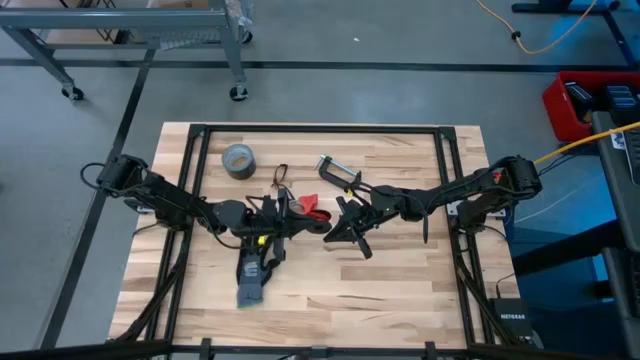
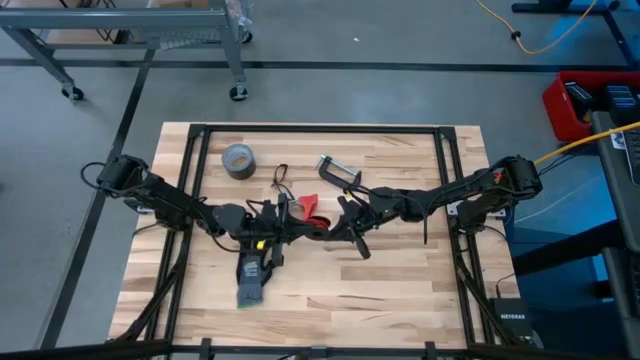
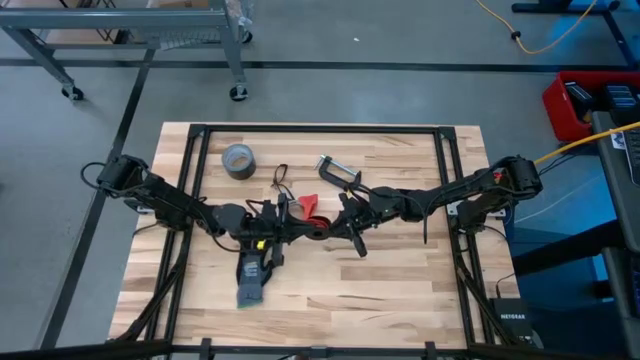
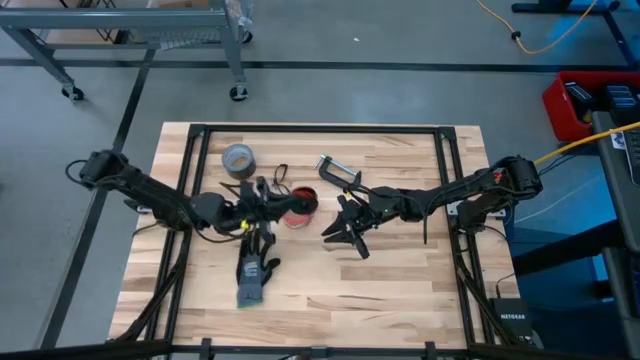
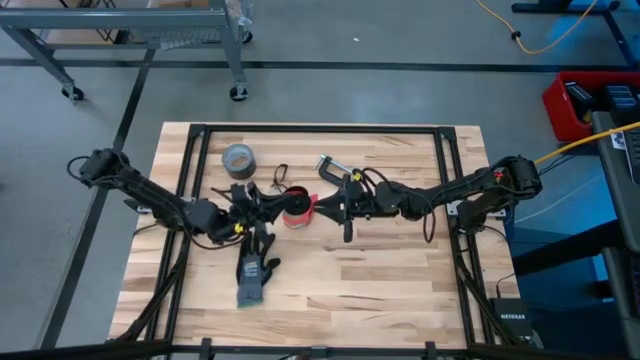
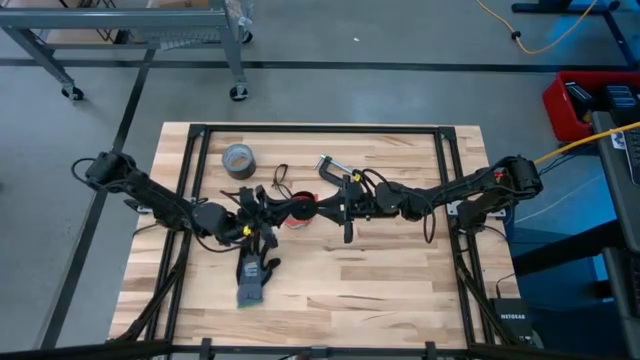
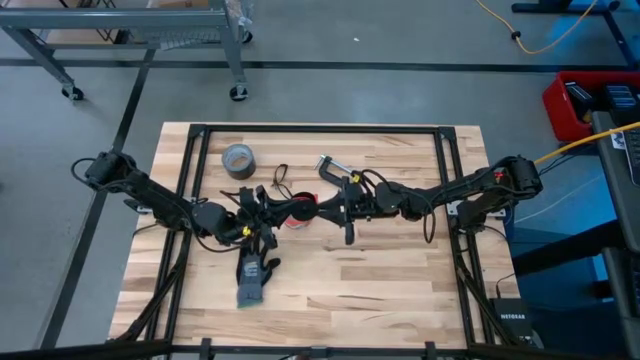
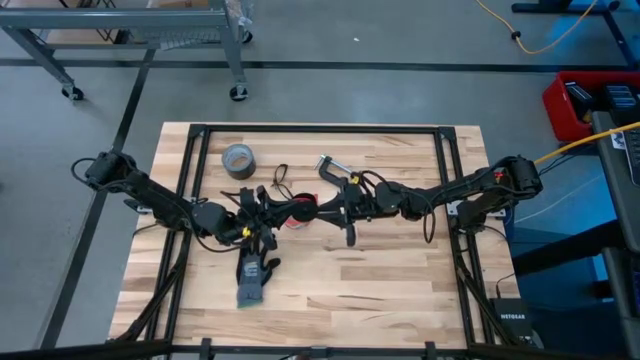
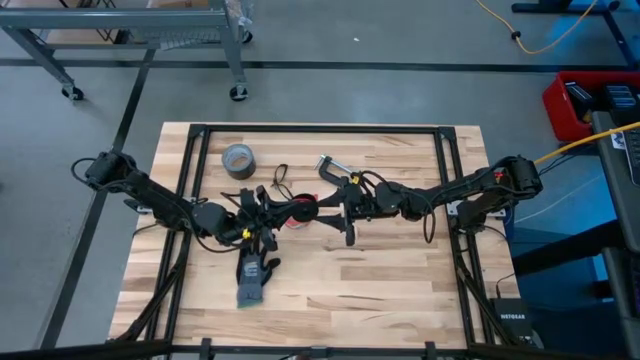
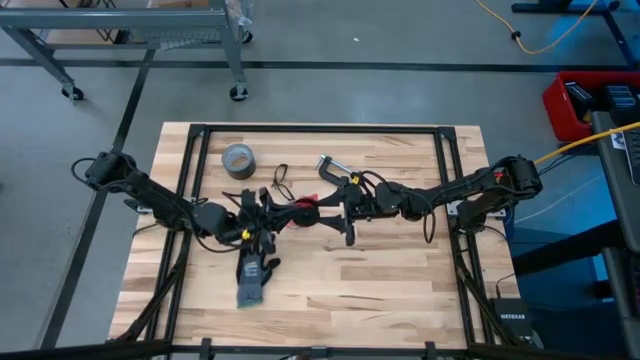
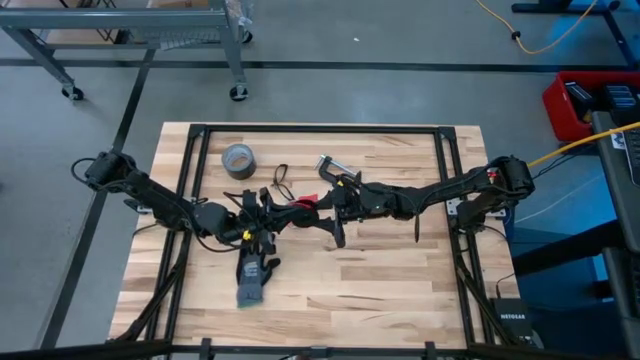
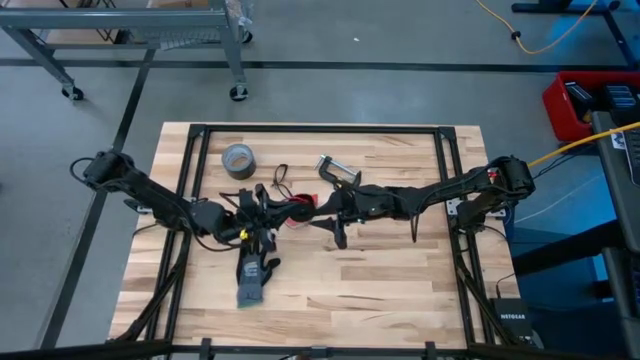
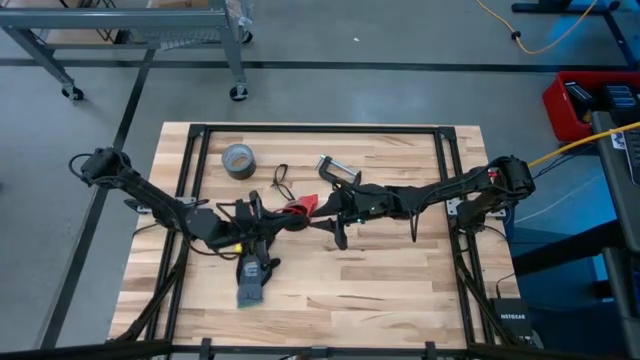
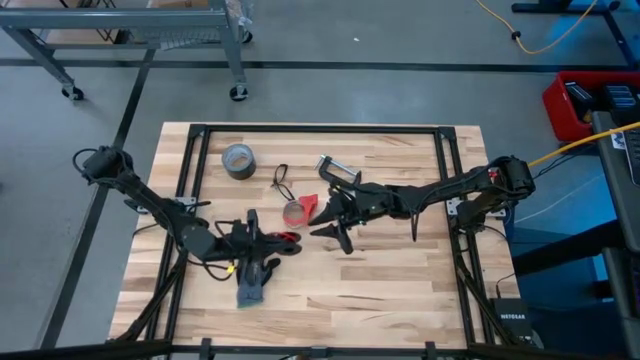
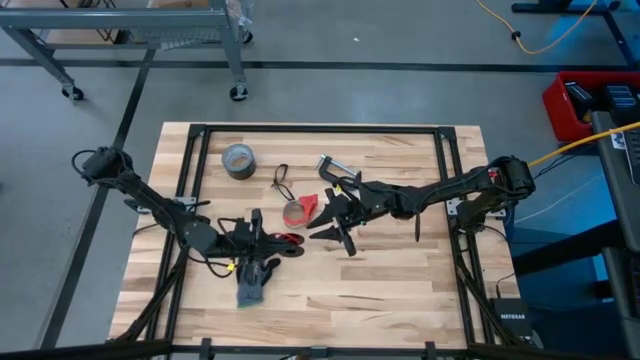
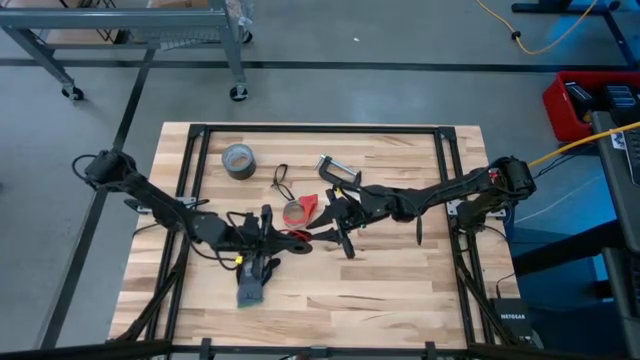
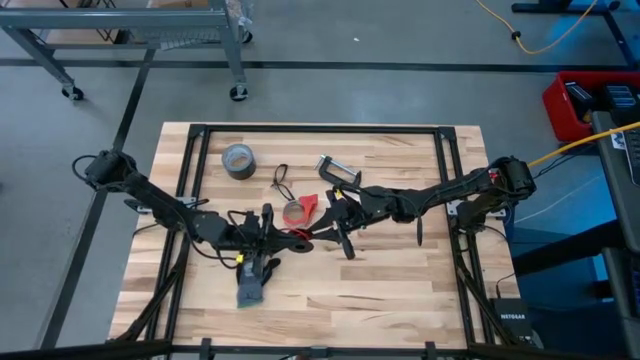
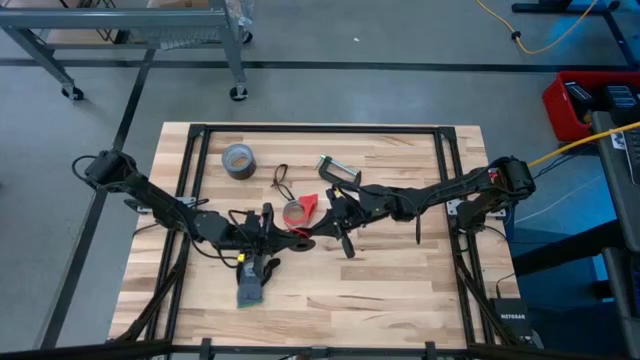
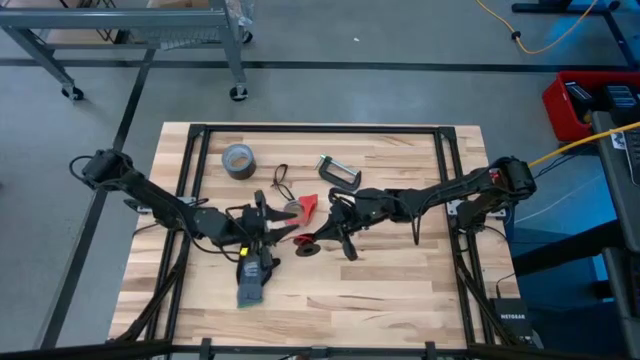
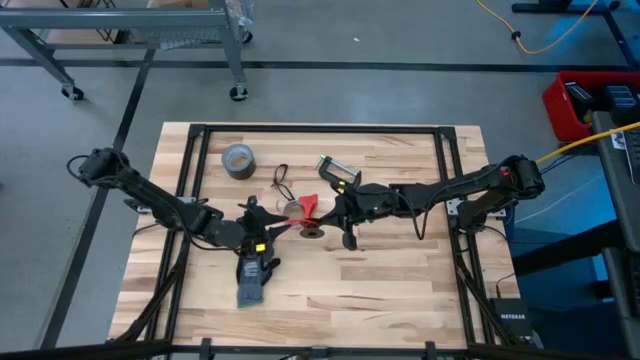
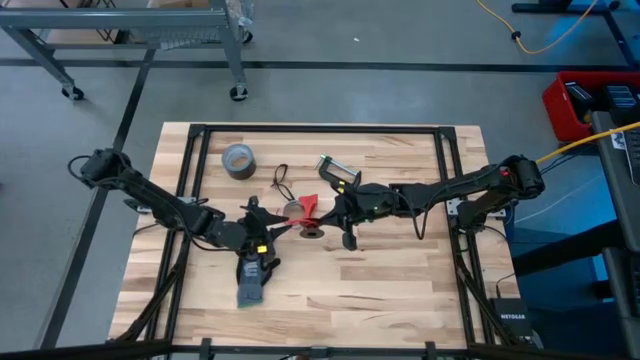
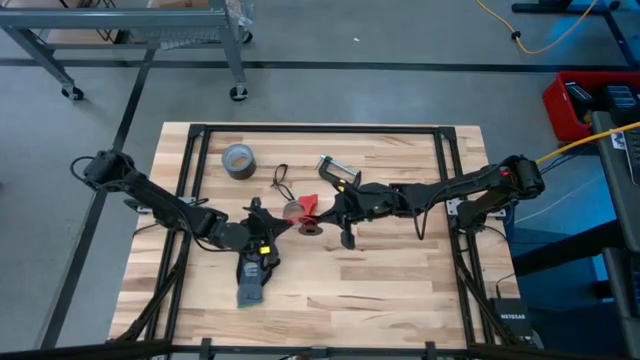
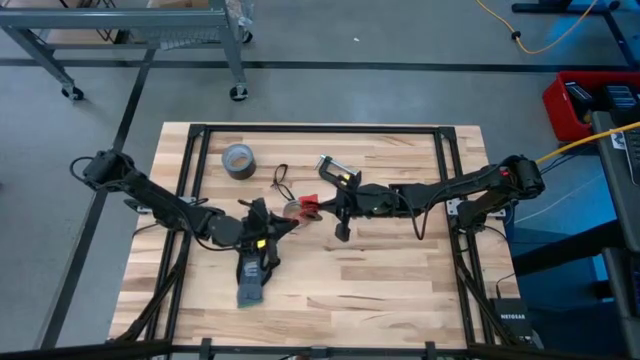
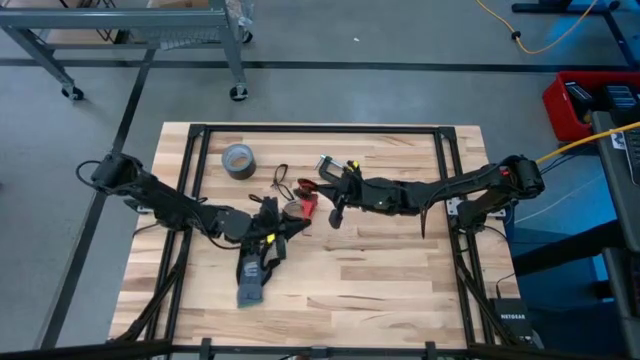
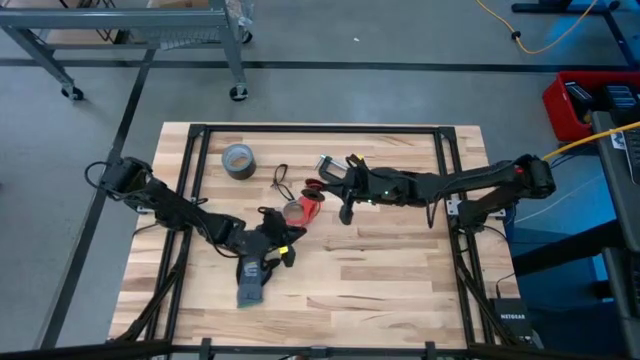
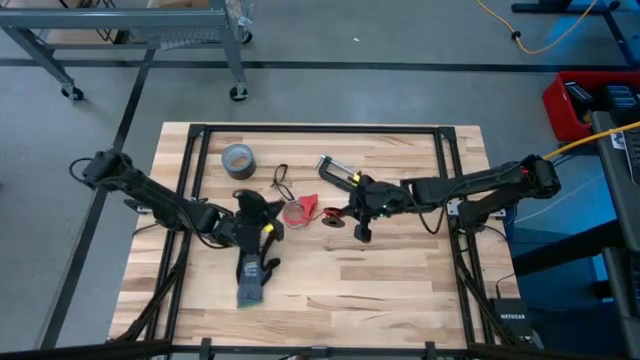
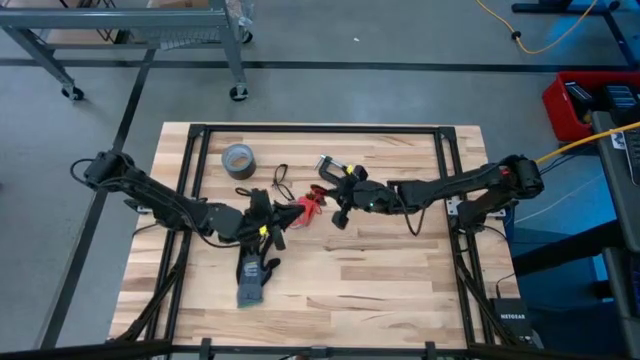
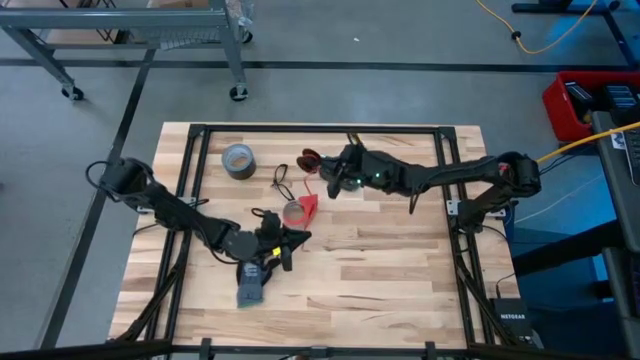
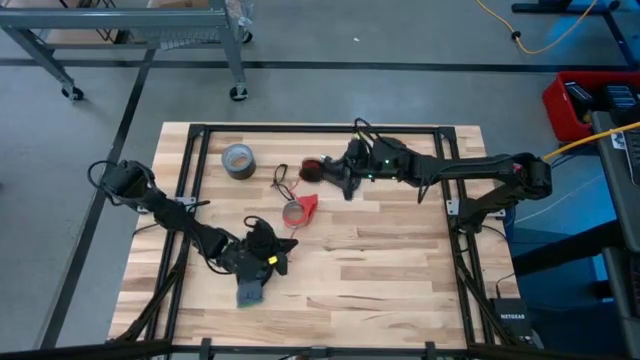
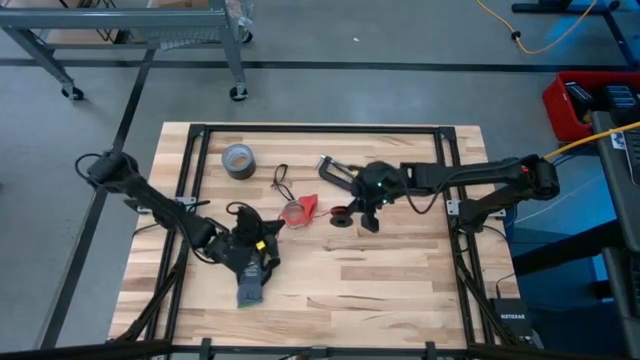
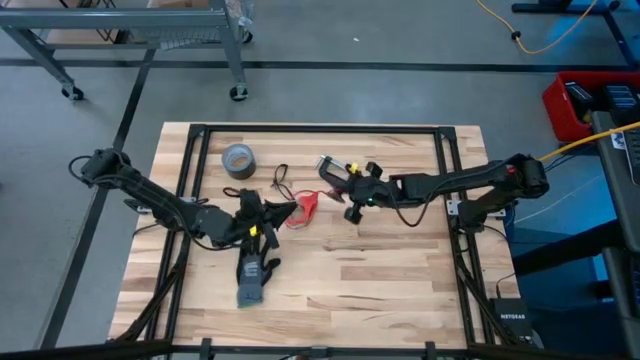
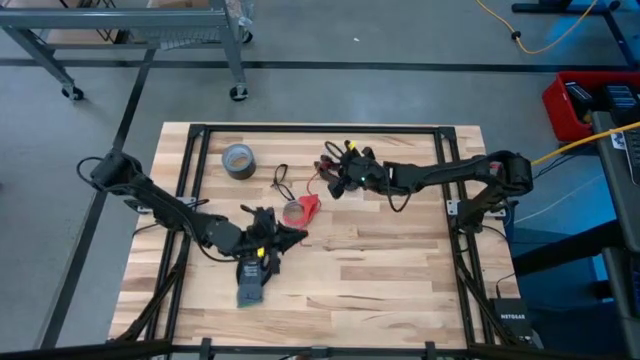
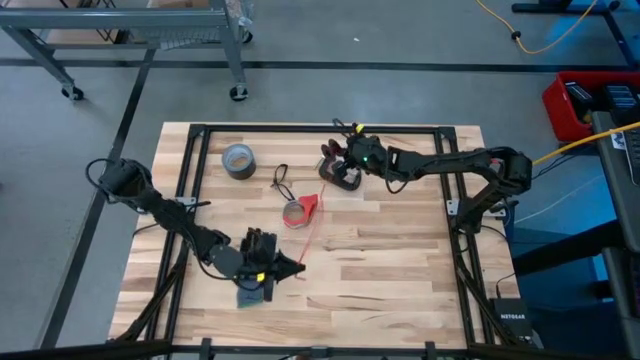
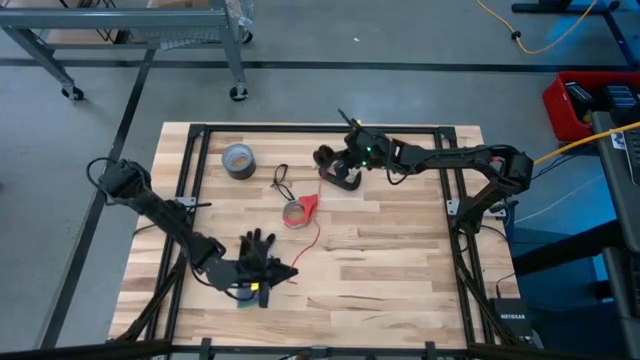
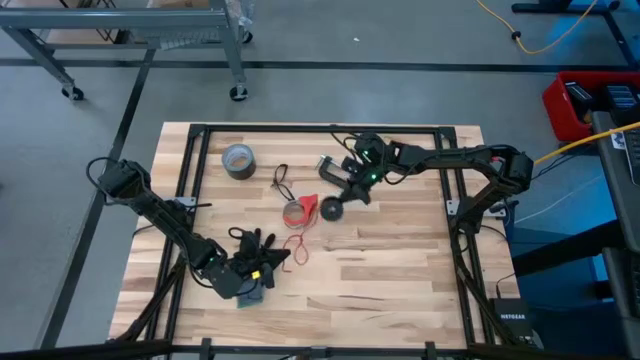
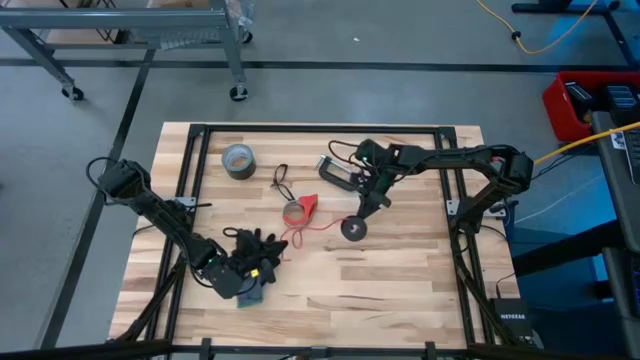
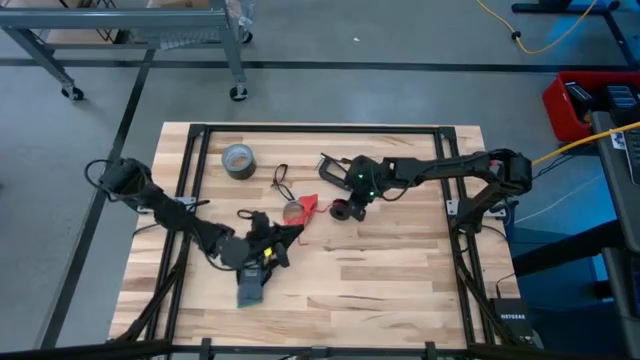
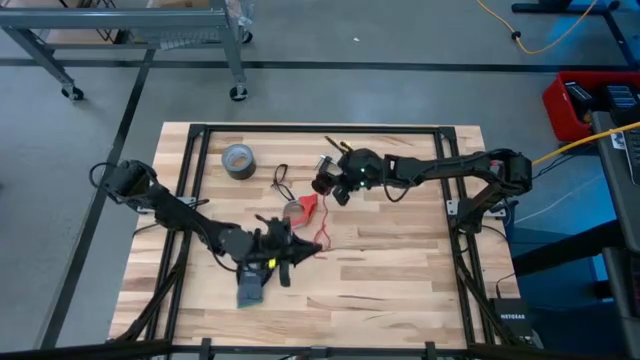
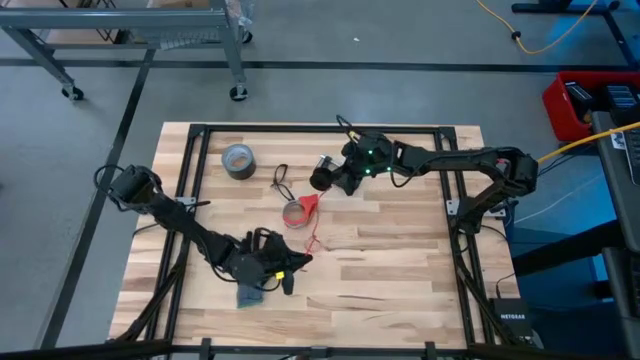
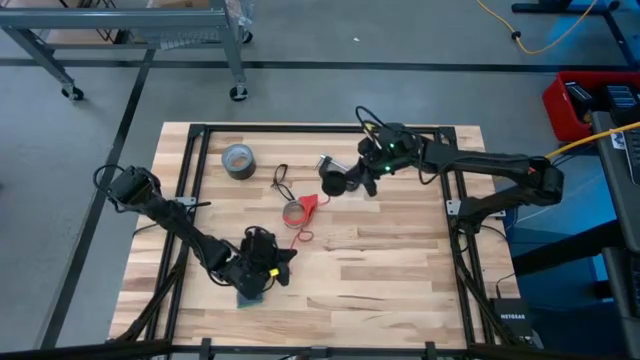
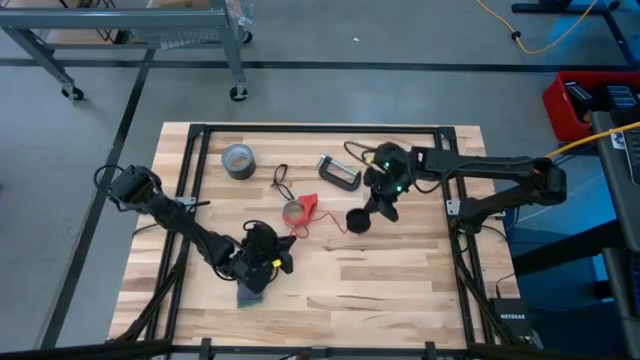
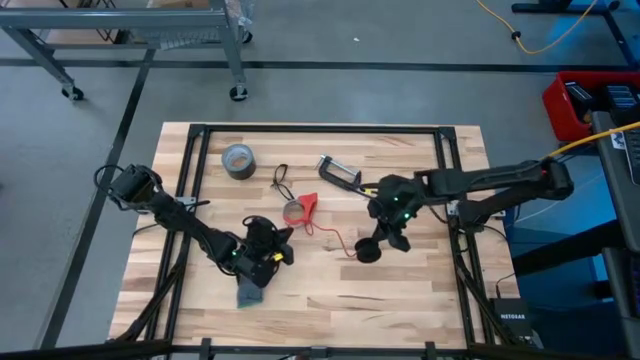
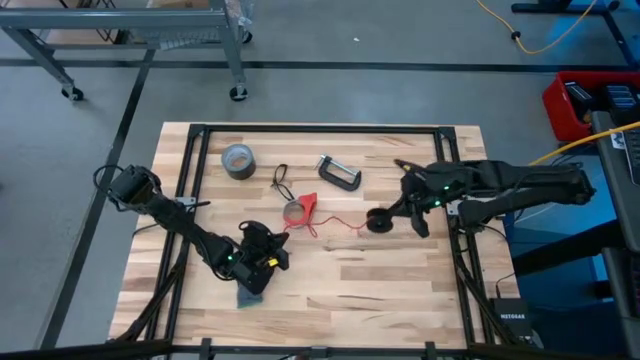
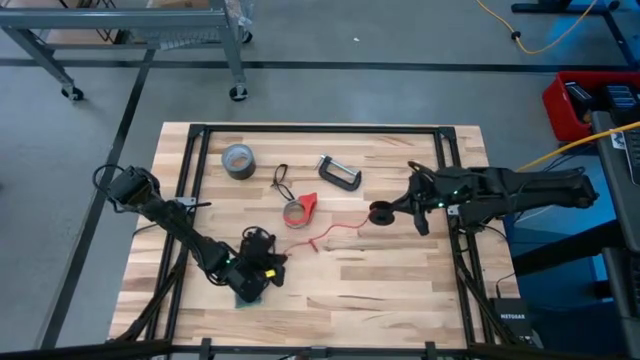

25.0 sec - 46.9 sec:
Task: Coil cords
Uncoil the red wire from the spool
